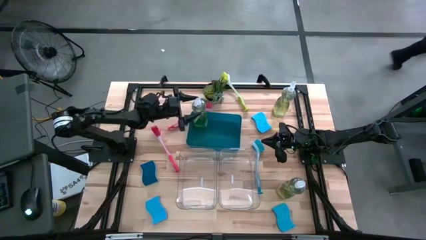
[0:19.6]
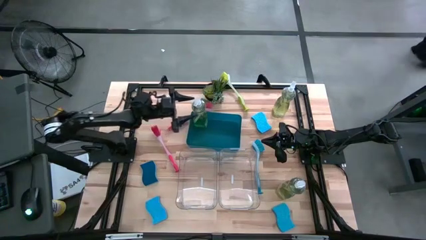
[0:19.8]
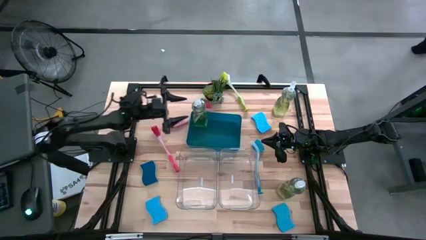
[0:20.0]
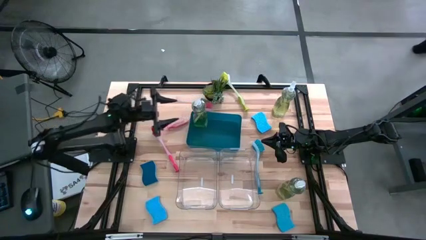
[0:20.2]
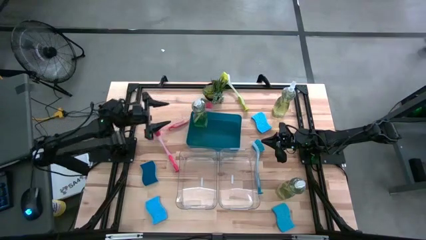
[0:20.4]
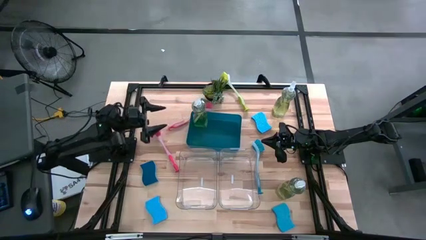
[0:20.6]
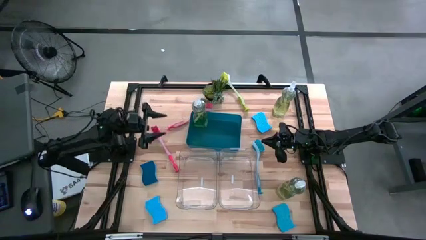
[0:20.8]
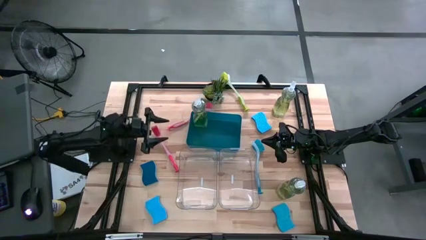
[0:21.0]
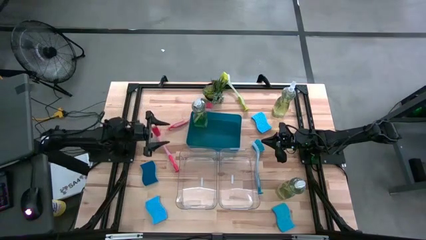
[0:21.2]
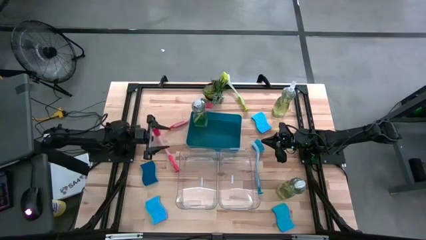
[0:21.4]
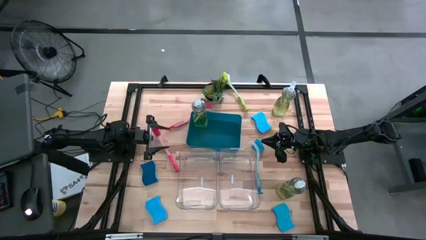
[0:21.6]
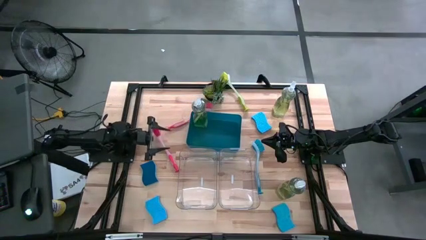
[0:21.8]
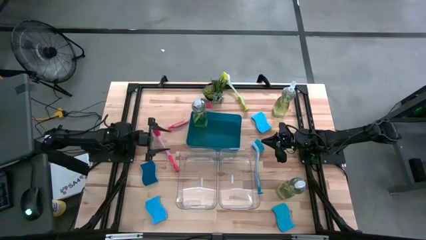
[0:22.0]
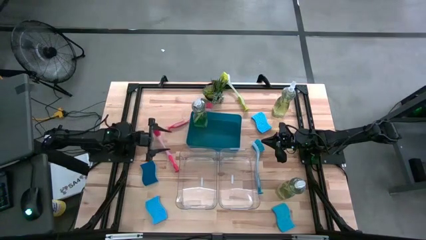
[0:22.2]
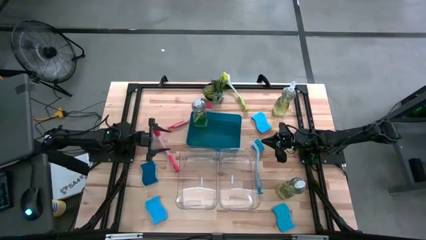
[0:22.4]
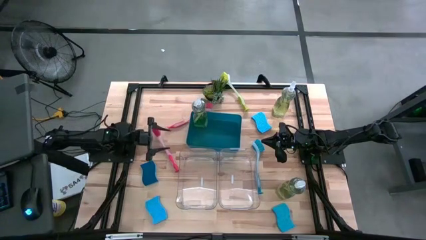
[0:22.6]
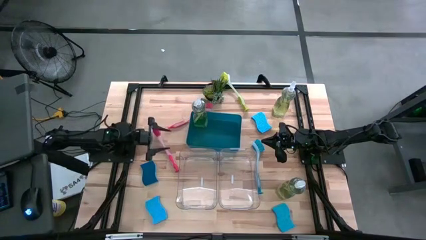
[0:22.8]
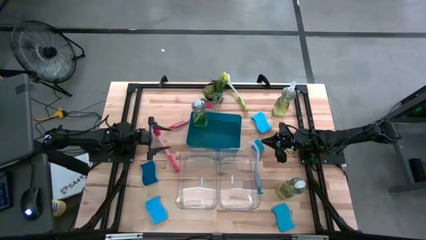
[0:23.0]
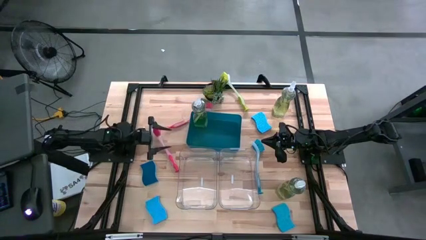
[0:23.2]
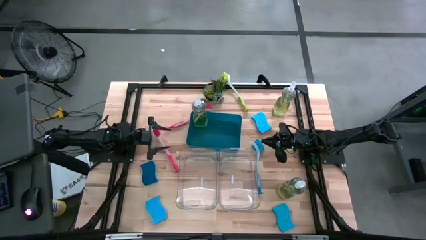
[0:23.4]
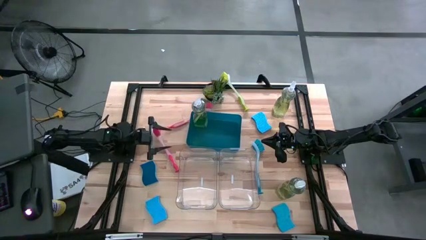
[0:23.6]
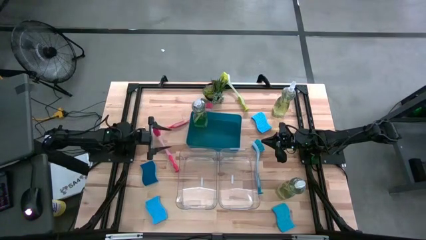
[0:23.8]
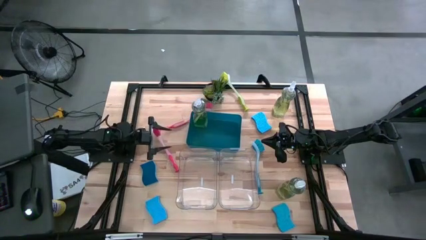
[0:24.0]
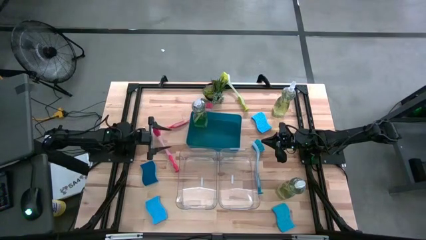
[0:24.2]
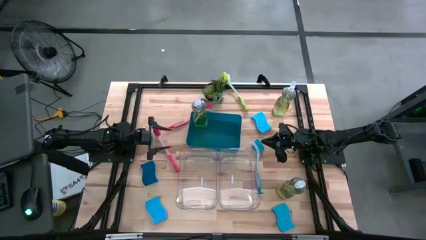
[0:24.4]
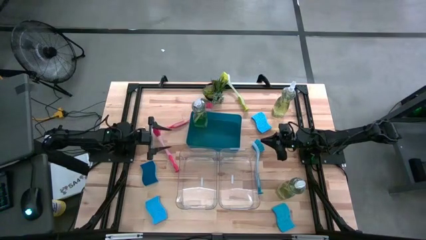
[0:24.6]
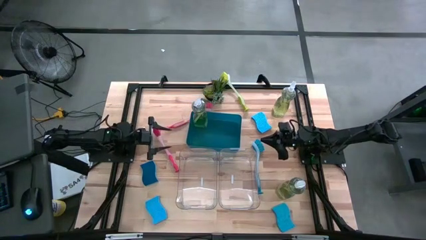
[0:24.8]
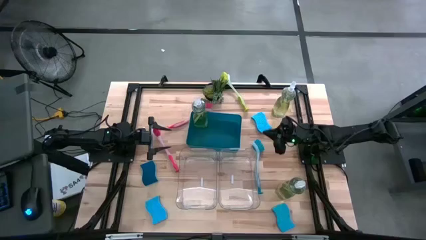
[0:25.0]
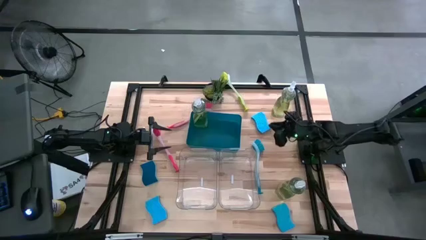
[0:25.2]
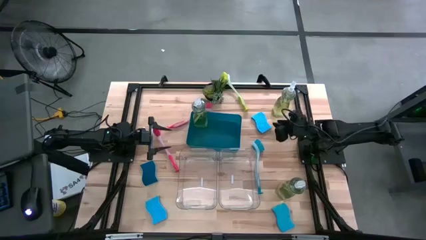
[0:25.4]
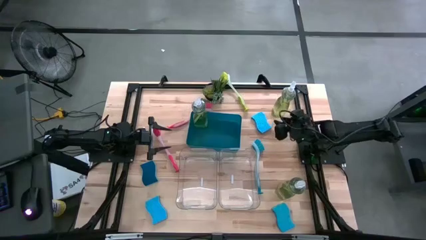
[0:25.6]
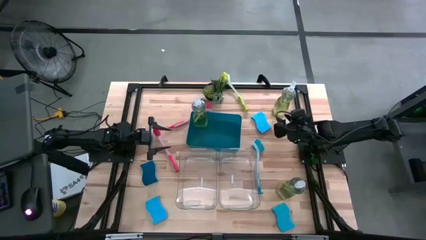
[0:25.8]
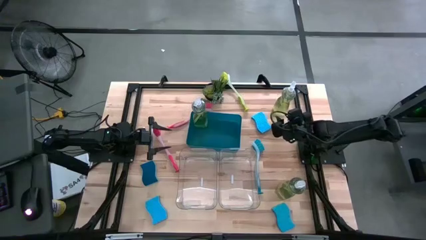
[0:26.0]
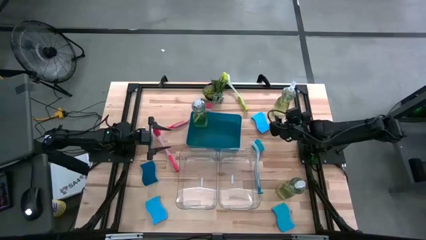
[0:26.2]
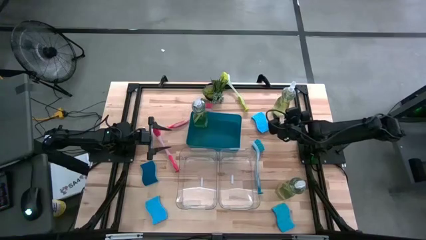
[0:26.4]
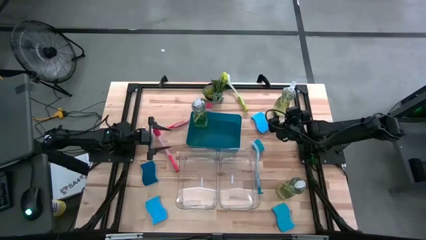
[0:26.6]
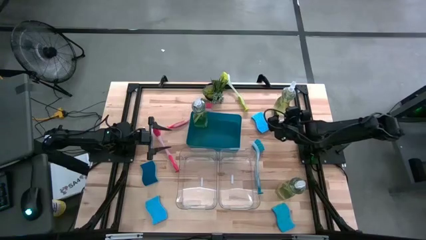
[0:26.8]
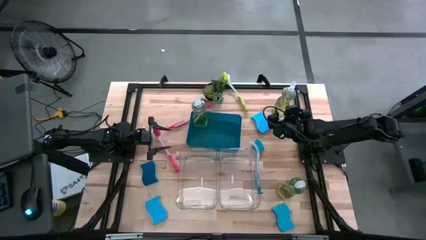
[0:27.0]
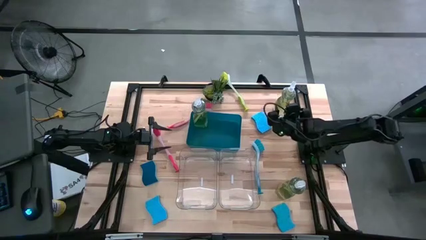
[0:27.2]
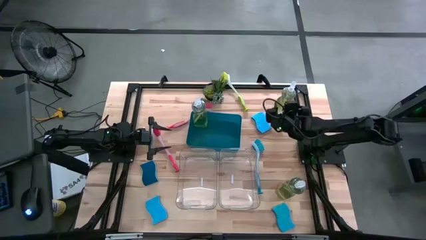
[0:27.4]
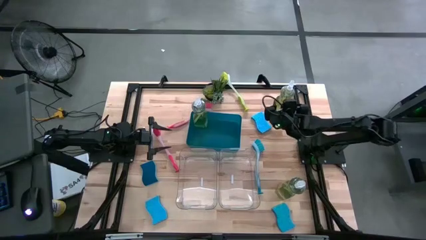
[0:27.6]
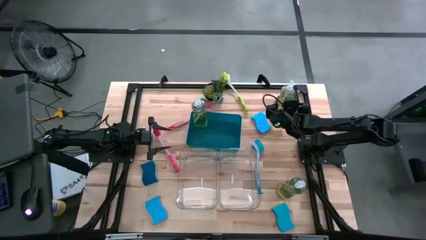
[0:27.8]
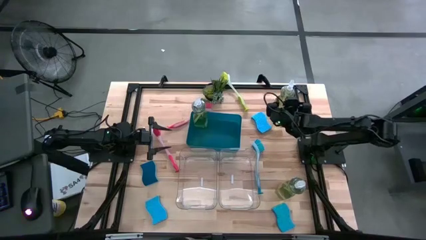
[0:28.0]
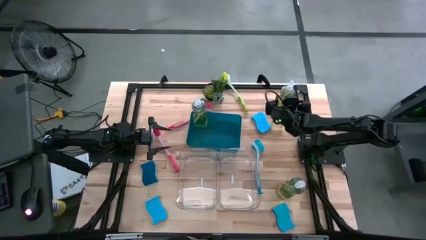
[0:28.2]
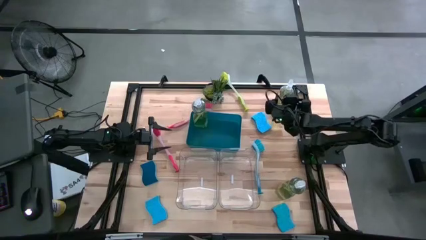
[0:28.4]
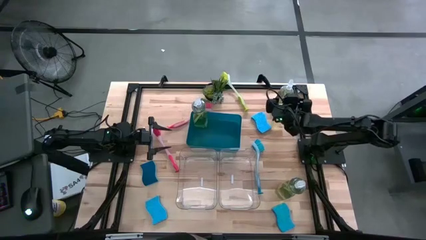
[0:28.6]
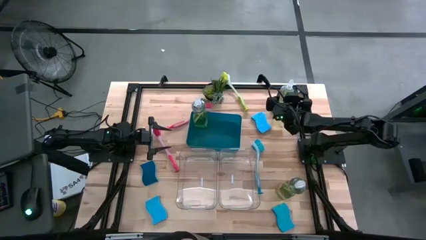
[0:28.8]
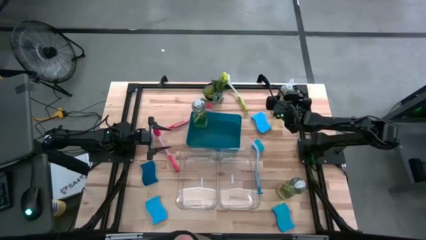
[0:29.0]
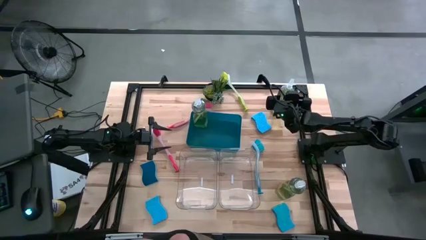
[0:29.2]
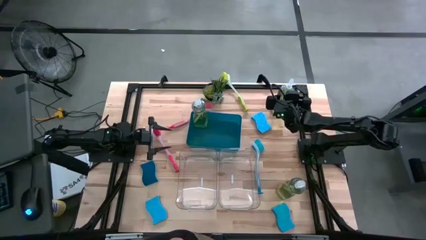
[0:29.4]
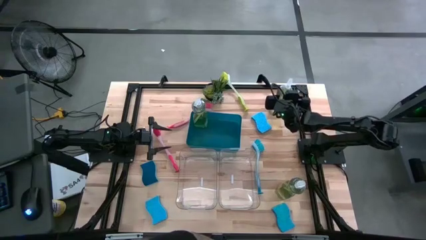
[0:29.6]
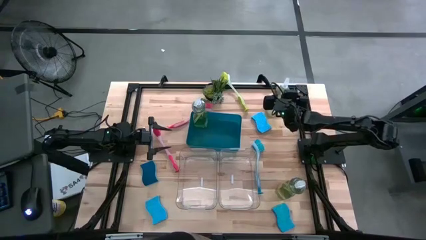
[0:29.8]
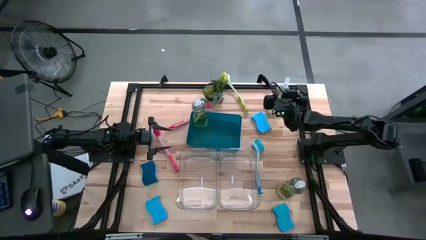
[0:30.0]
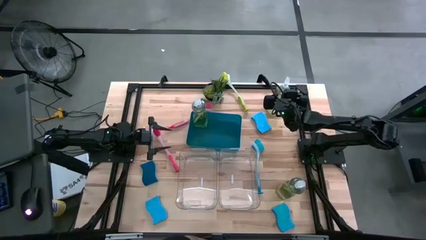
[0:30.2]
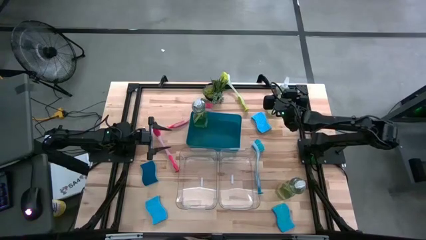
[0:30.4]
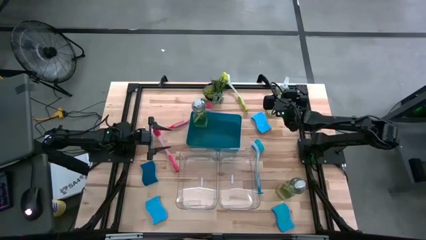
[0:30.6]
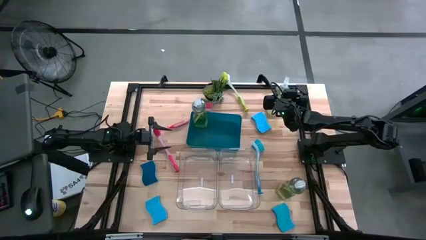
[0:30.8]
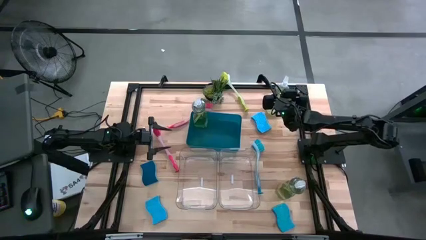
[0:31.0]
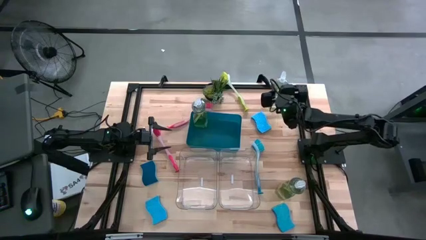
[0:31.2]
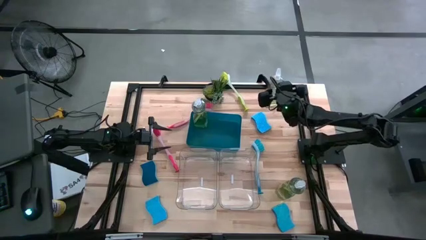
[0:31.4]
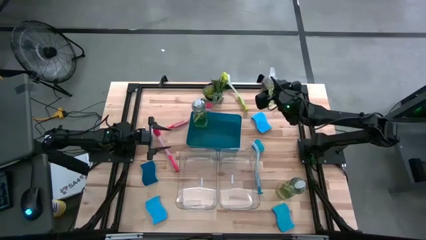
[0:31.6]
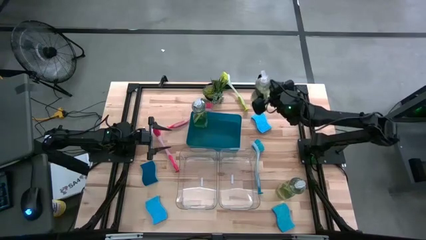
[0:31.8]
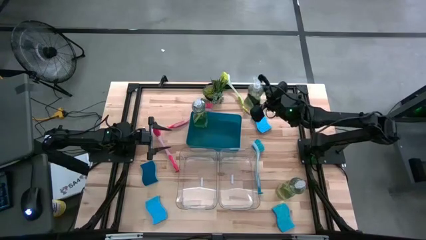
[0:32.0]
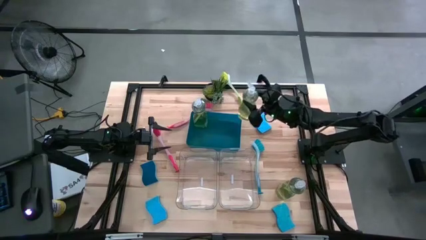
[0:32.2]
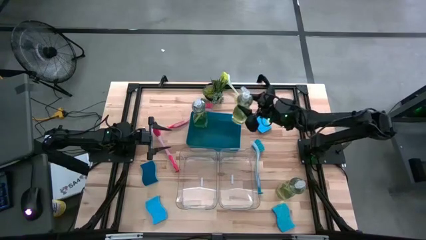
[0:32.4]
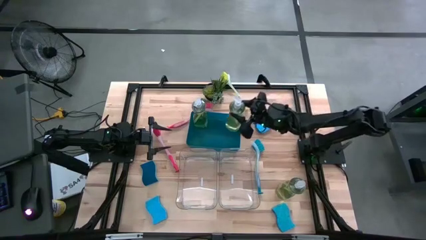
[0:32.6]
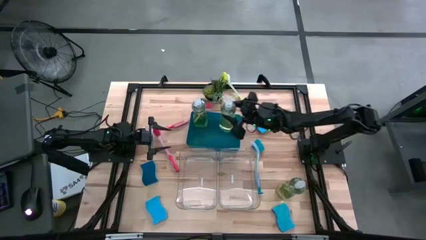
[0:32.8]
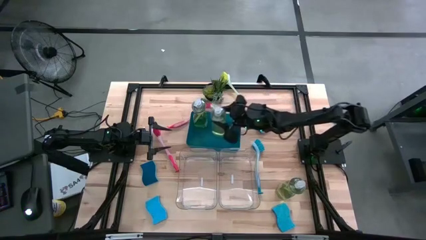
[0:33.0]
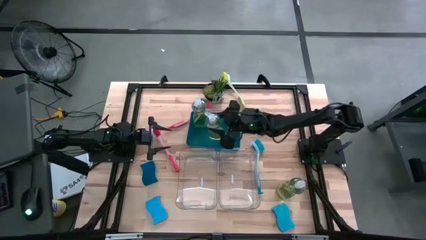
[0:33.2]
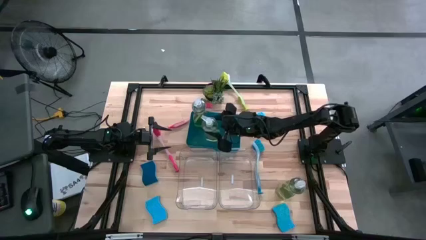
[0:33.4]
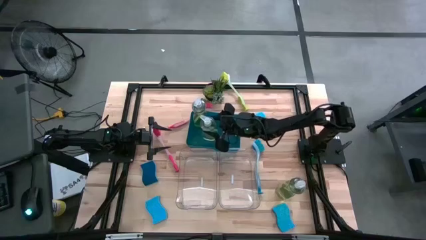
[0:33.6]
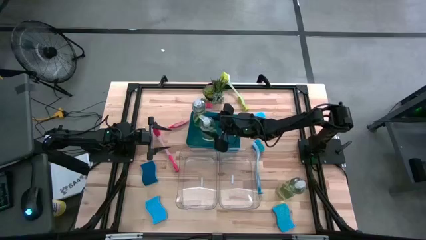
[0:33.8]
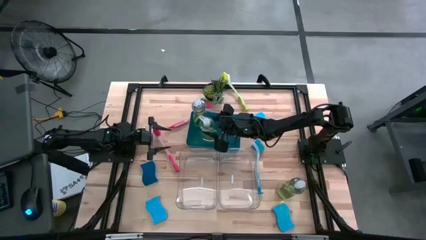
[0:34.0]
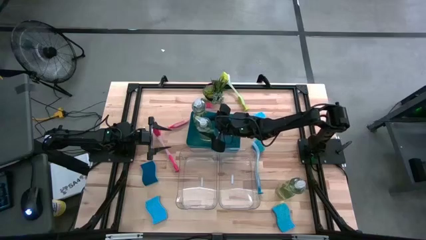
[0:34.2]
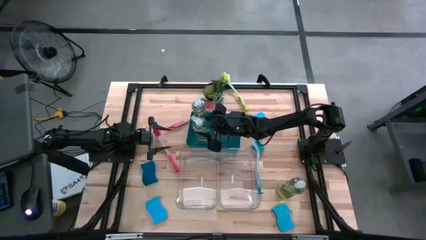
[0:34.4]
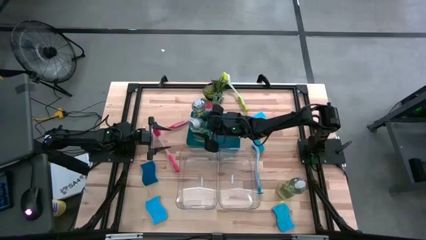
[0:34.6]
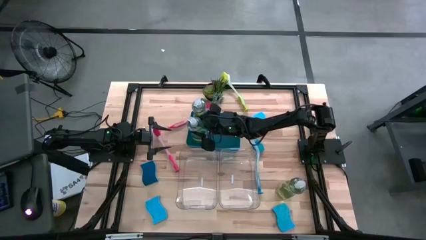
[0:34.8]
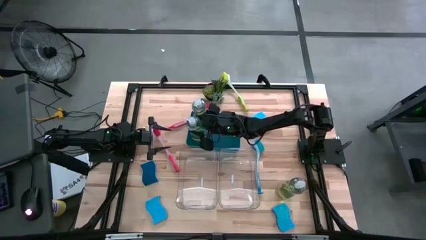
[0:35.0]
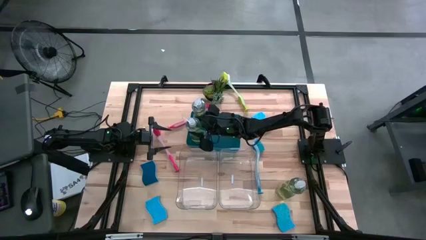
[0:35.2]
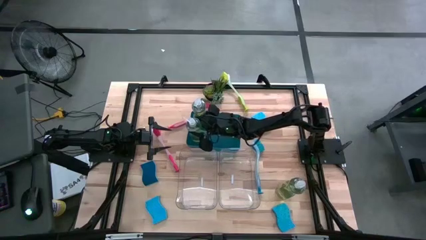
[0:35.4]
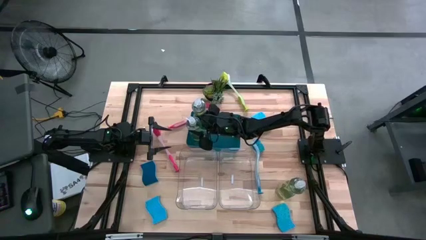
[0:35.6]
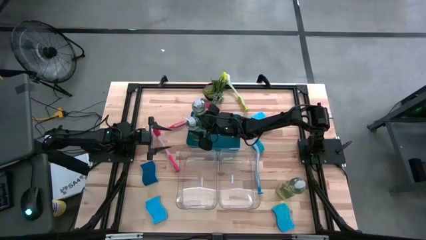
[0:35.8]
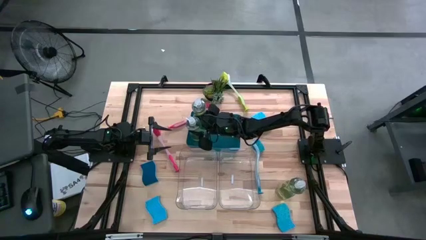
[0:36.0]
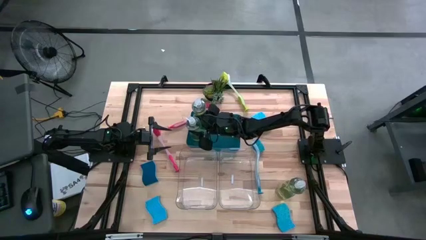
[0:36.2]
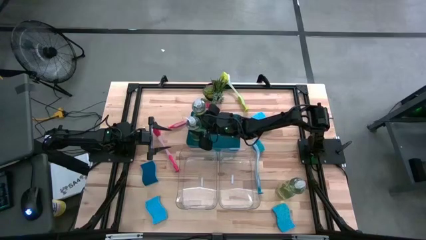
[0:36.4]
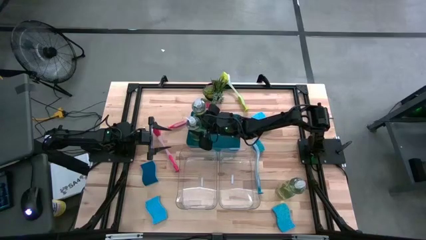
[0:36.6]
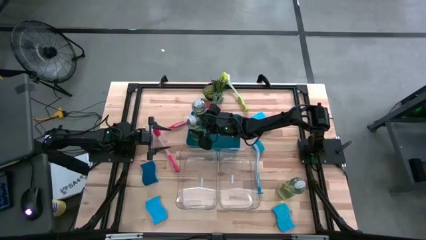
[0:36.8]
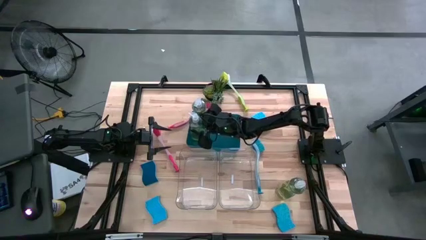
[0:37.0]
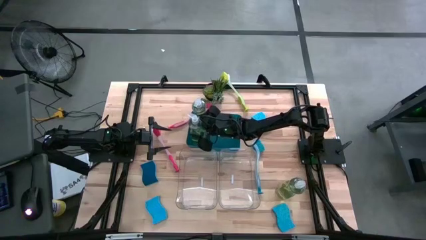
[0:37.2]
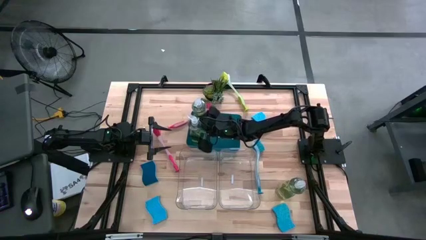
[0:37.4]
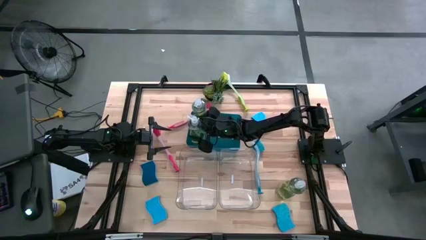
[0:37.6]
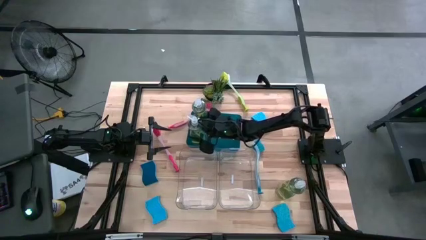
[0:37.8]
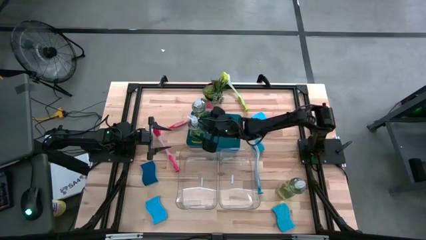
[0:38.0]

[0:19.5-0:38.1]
Task: Pick & Place Kitchen Sink Supplies
Put the green dish soap into the blue bin
